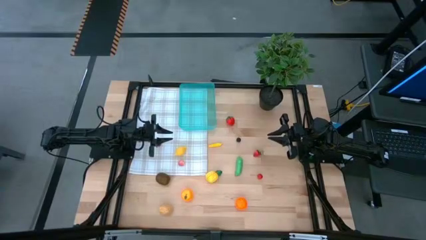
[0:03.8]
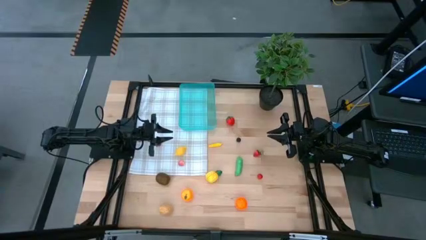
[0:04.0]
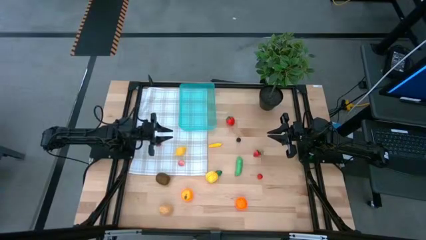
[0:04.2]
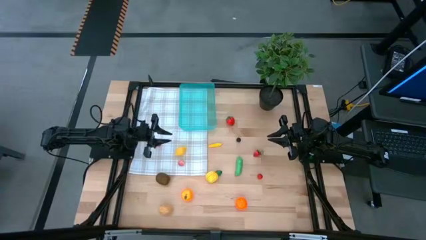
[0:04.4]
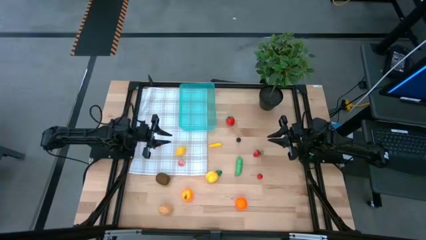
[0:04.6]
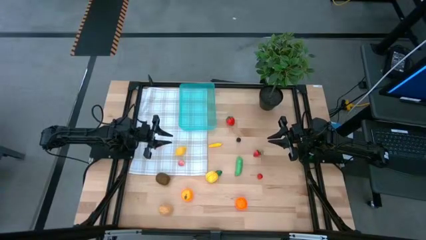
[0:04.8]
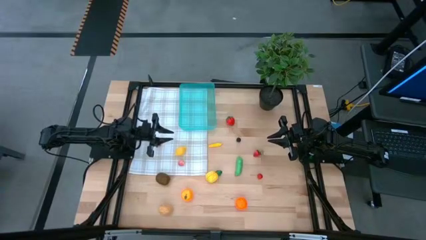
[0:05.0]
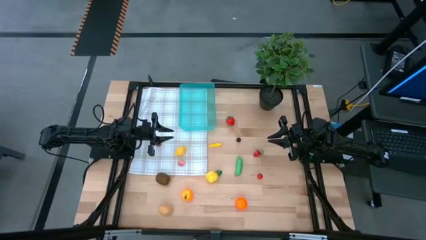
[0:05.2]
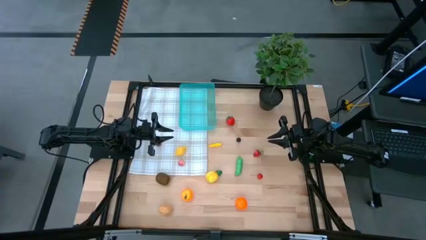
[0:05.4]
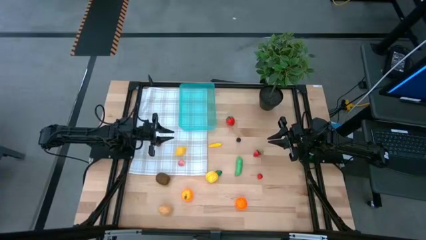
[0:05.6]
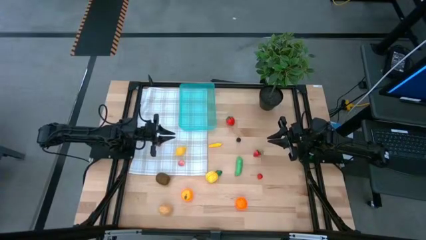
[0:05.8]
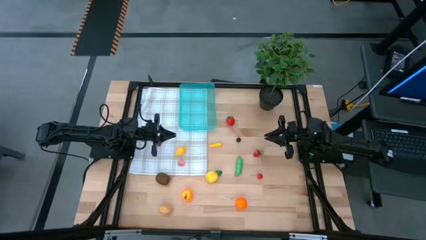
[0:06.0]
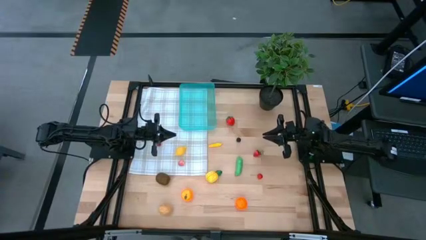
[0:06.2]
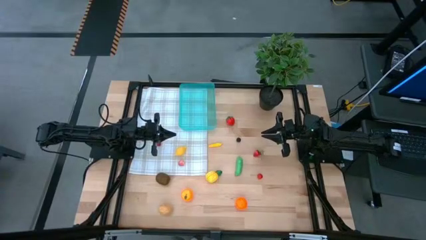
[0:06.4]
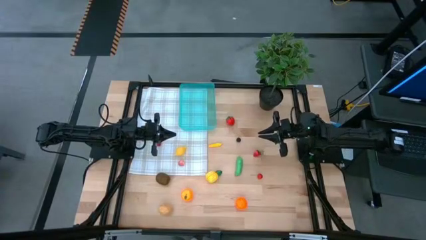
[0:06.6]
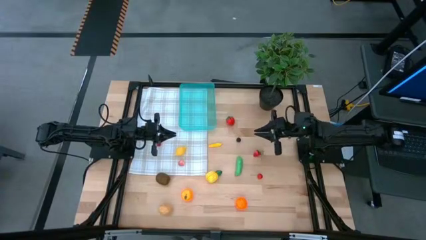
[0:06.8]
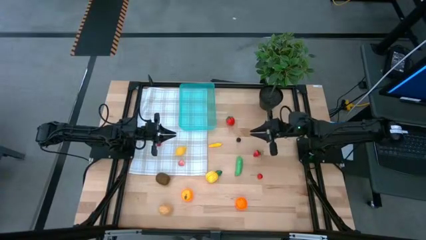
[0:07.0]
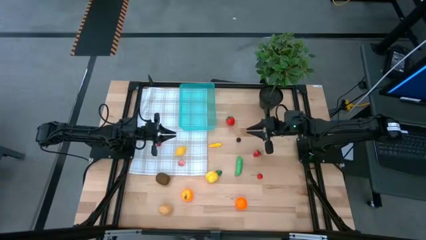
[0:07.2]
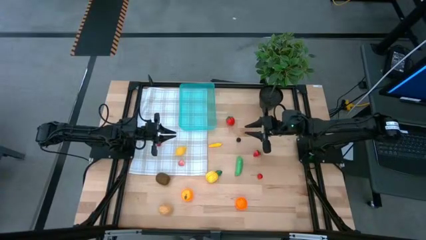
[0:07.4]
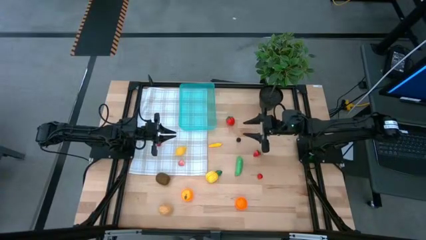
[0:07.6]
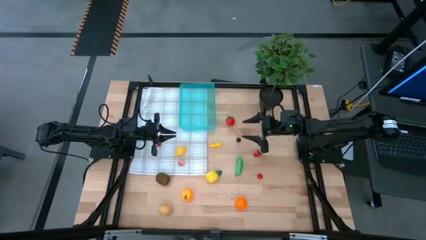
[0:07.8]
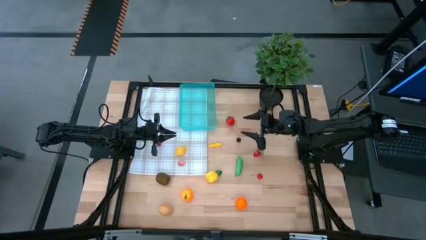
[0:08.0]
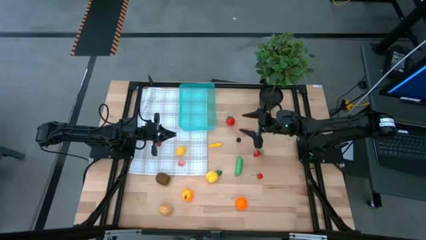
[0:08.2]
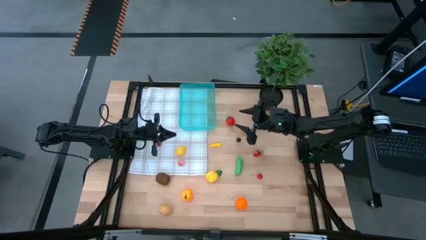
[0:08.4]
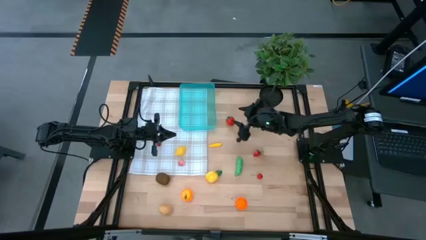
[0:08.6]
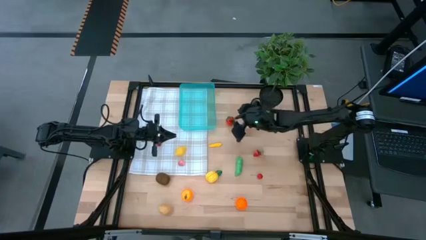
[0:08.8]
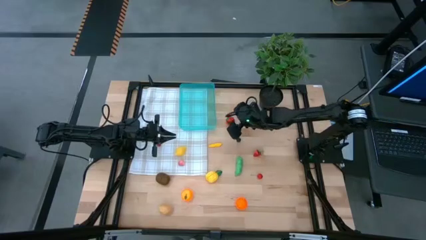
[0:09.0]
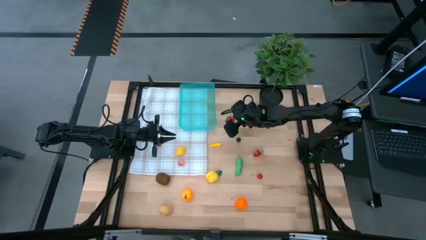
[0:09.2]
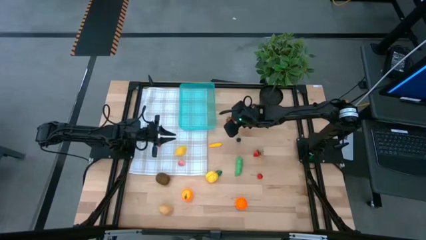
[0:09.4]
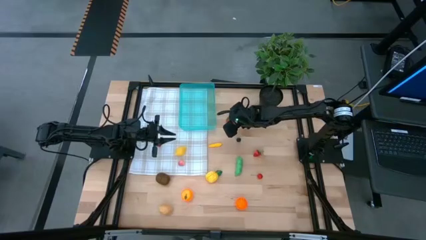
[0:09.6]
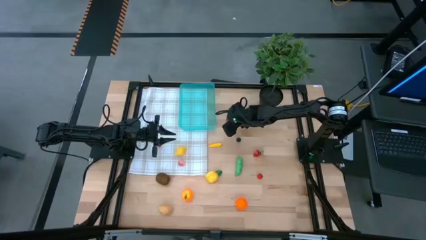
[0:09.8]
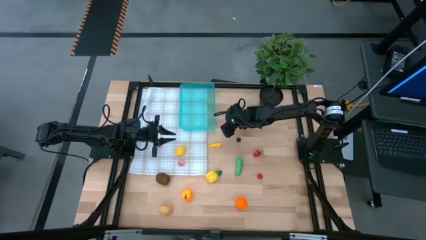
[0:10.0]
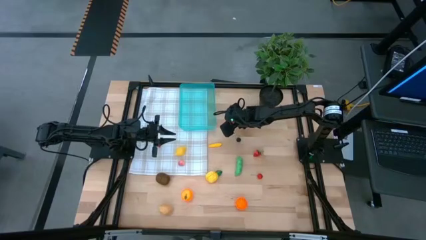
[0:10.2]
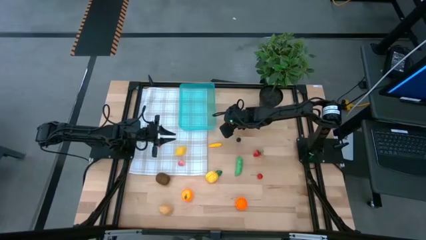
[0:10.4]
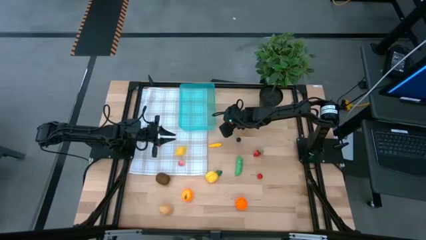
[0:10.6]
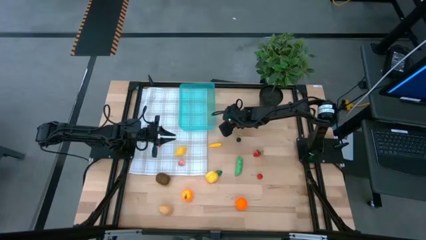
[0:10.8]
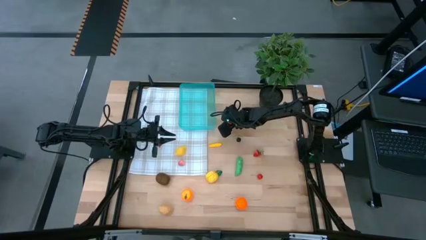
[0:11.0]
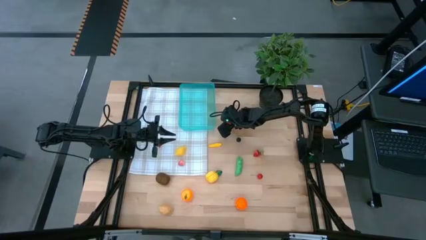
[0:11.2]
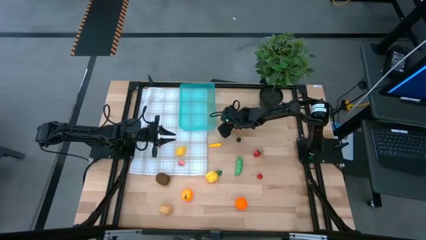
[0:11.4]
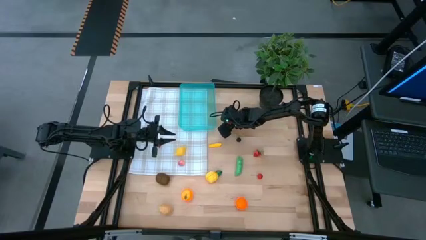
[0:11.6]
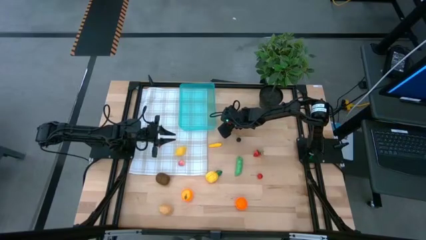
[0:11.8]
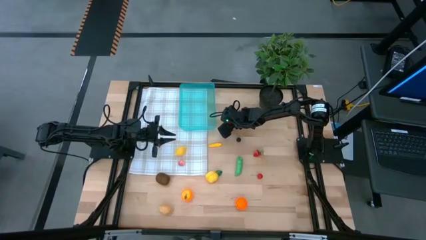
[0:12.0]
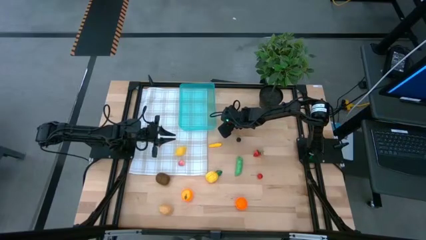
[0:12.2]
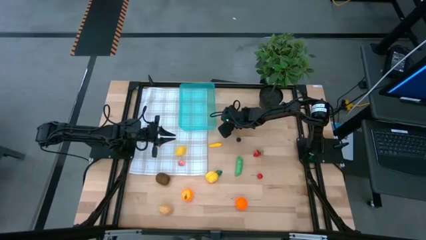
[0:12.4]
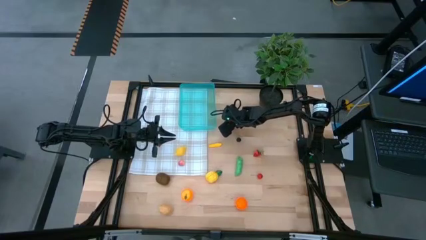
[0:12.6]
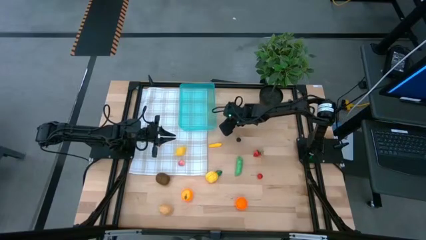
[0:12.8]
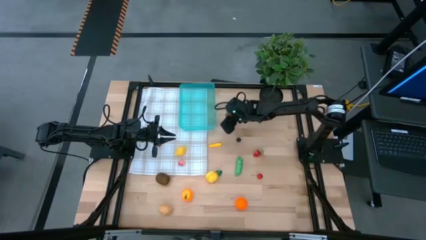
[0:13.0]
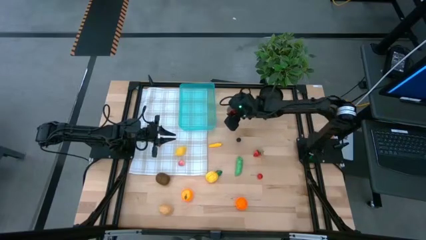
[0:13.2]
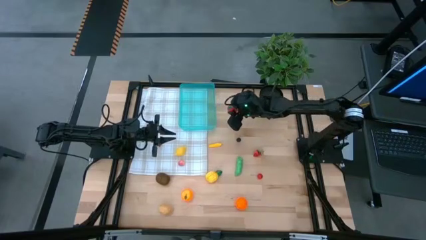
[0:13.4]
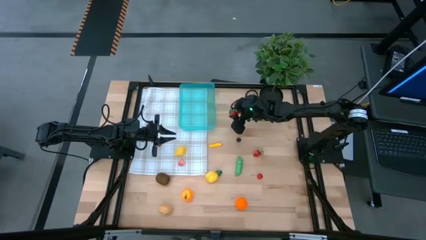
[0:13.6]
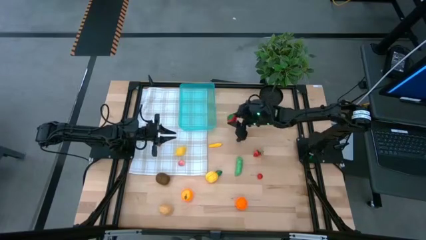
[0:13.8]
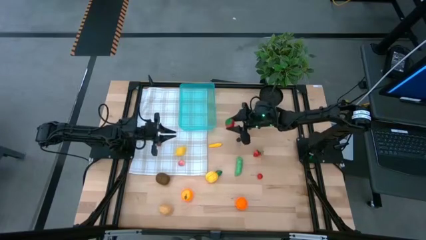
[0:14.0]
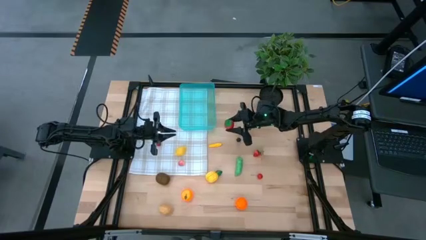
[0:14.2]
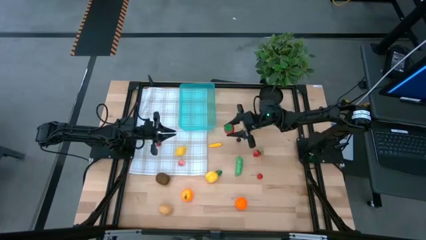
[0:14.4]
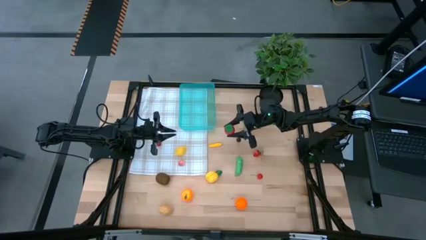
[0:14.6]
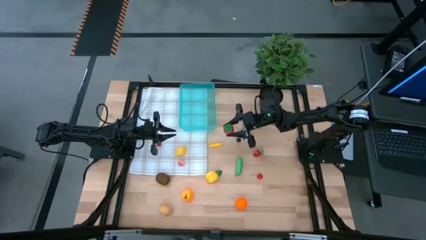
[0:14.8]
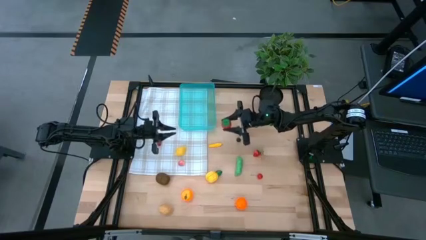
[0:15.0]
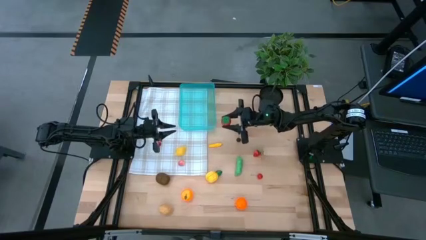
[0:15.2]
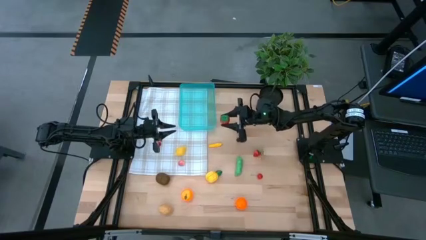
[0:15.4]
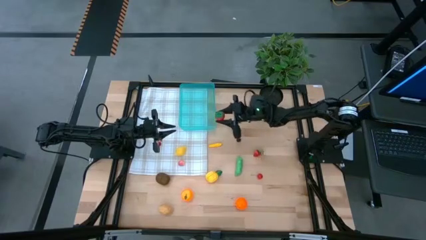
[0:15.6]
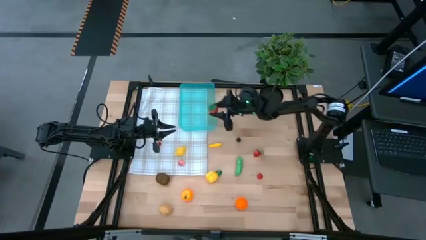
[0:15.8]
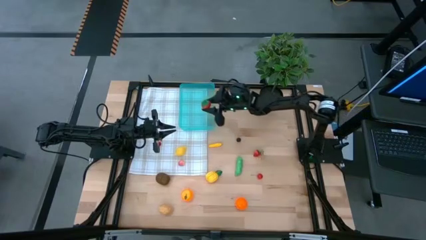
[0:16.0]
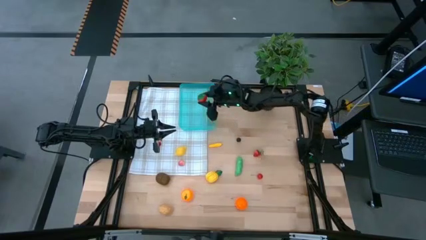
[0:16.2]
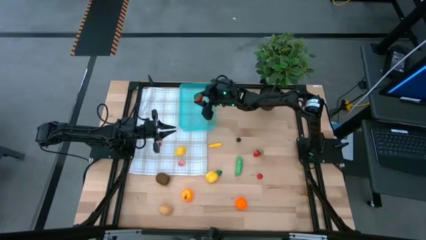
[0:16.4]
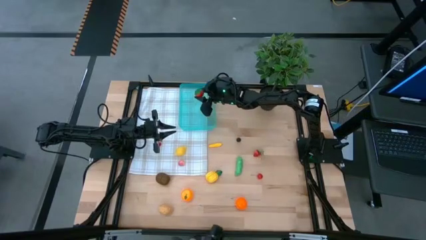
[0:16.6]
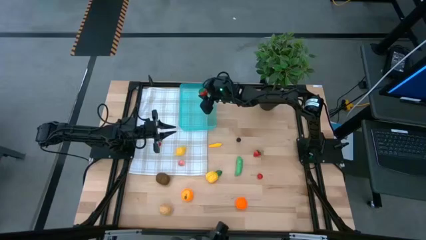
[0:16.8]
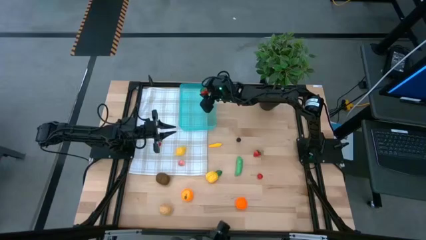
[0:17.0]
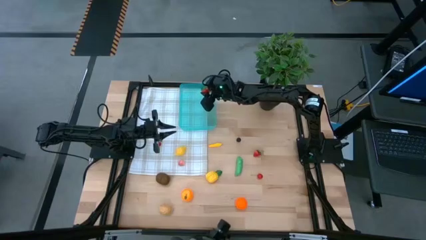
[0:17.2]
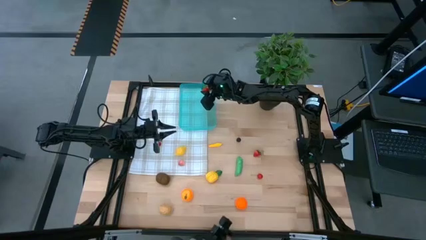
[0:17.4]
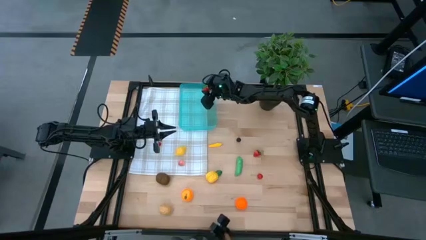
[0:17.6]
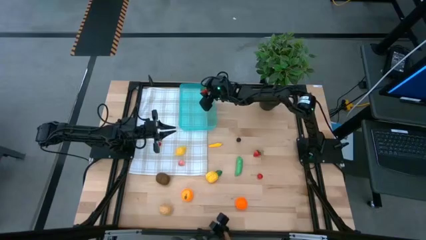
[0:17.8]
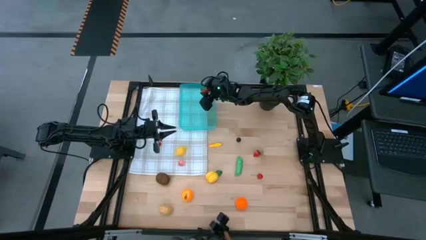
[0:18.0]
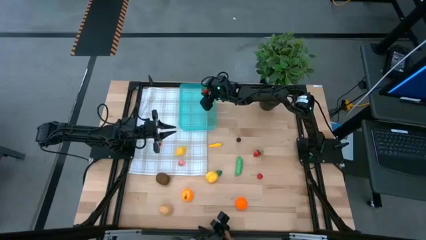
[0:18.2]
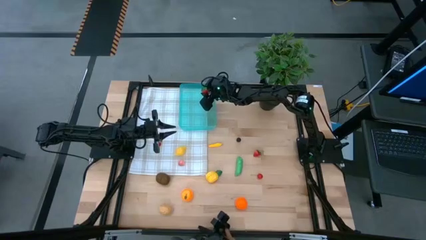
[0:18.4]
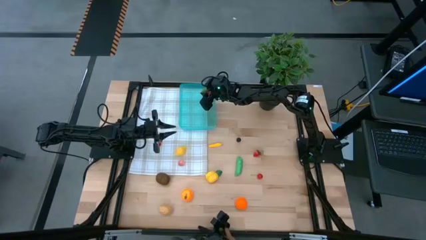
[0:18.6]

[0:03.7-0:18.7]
Task: Pick and placing Produce into tupperware
Put the top red strawberry into the blue bin
